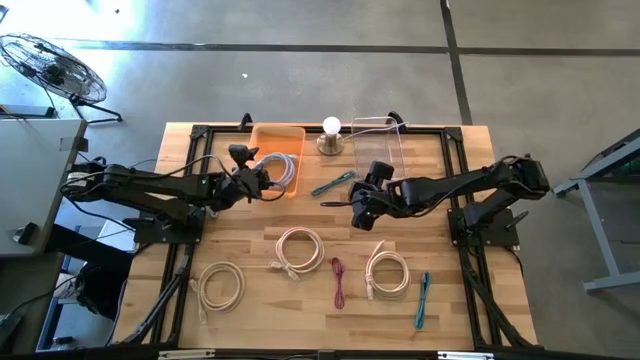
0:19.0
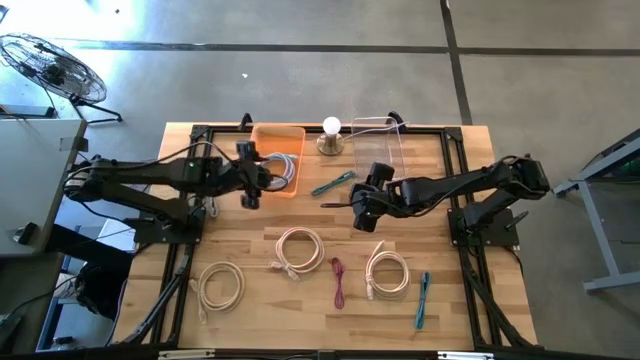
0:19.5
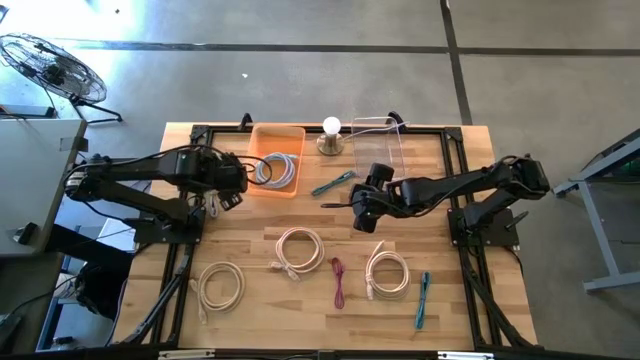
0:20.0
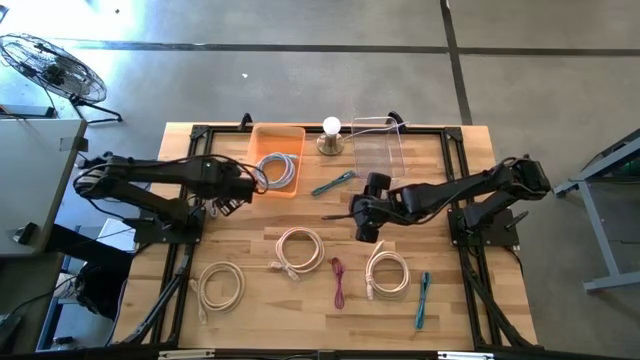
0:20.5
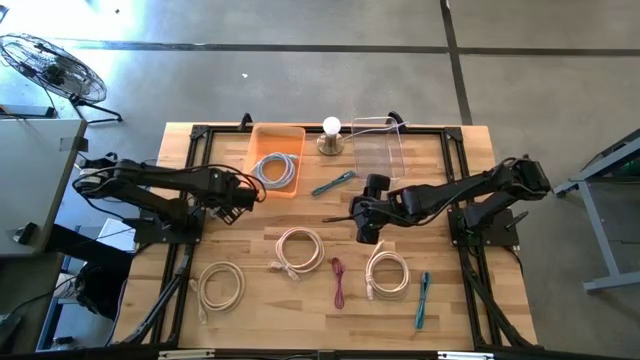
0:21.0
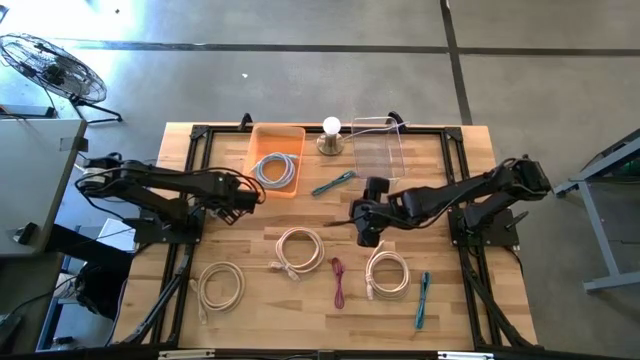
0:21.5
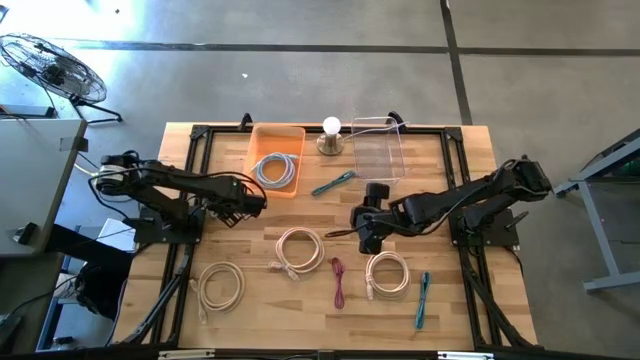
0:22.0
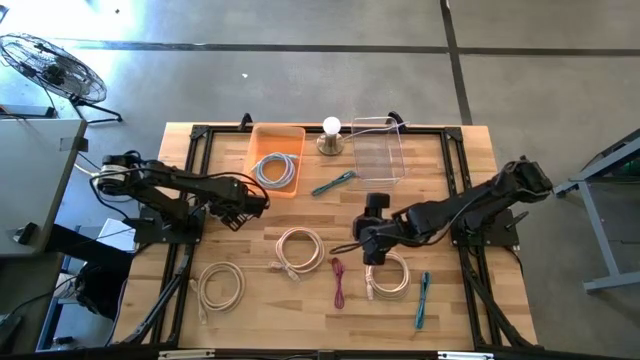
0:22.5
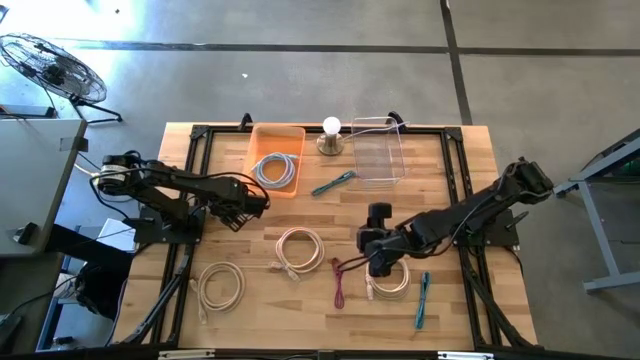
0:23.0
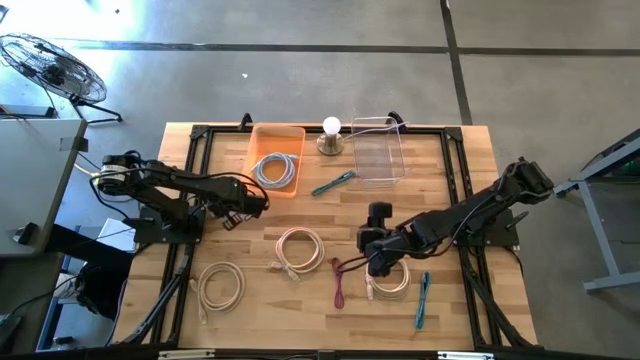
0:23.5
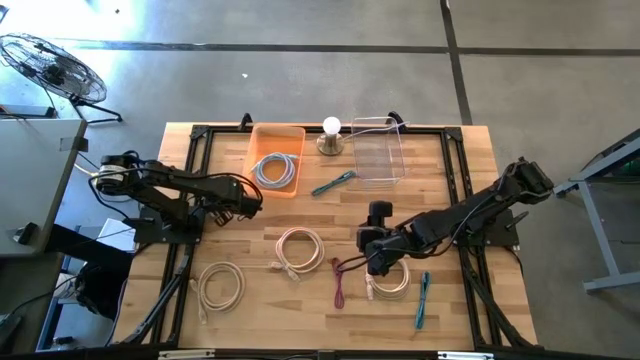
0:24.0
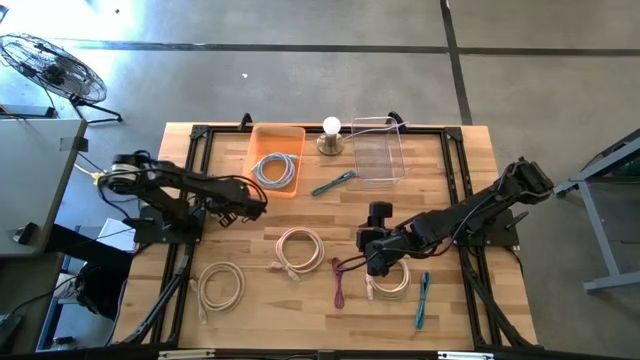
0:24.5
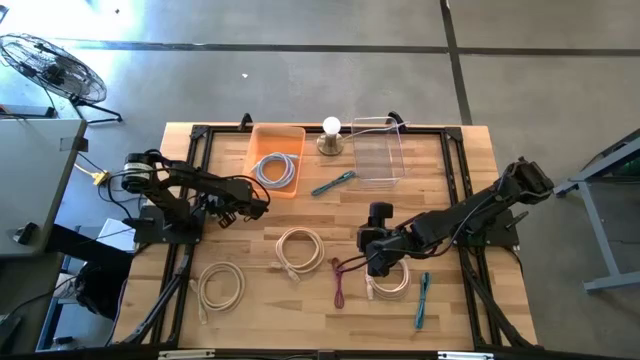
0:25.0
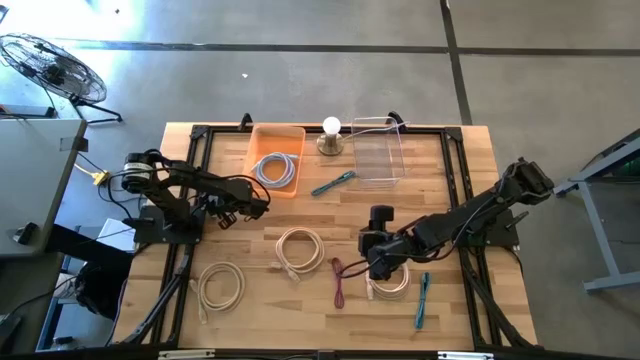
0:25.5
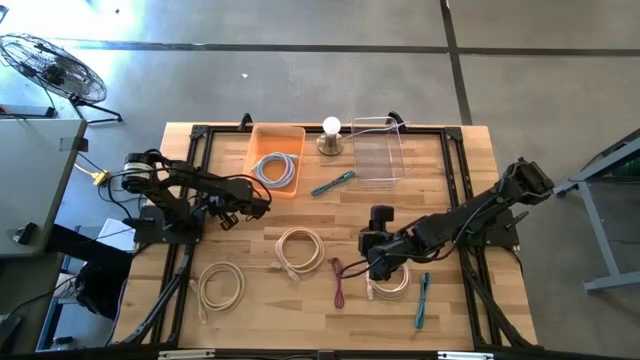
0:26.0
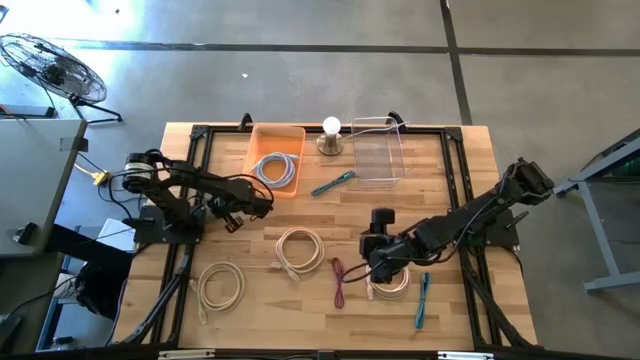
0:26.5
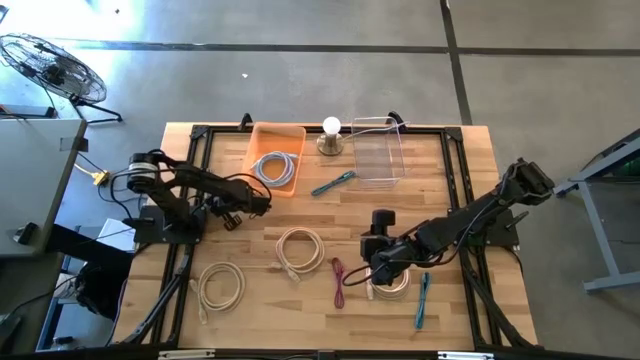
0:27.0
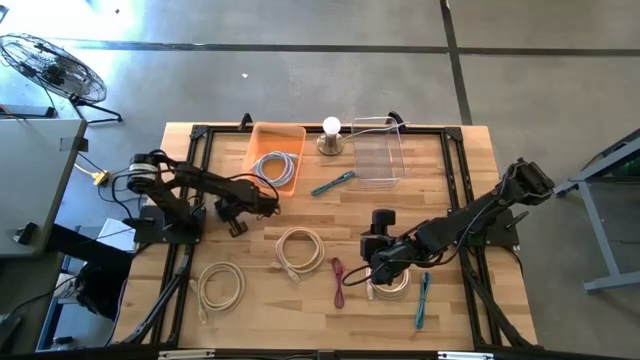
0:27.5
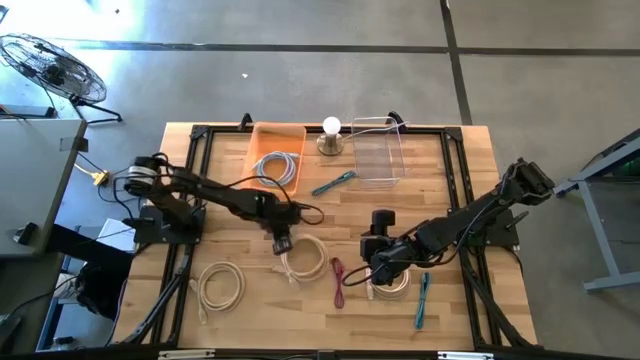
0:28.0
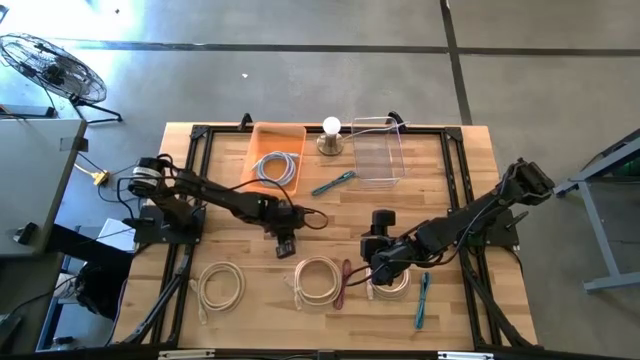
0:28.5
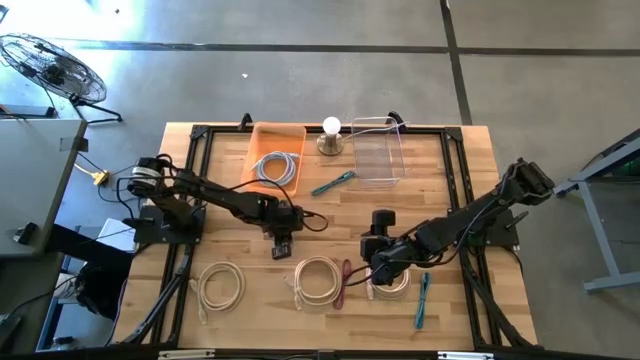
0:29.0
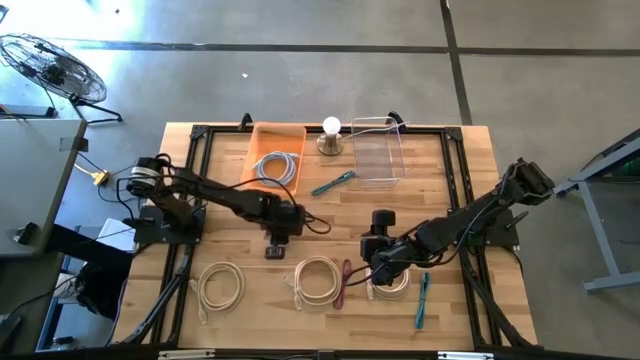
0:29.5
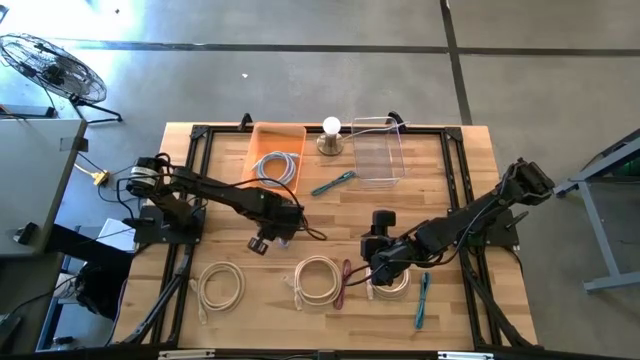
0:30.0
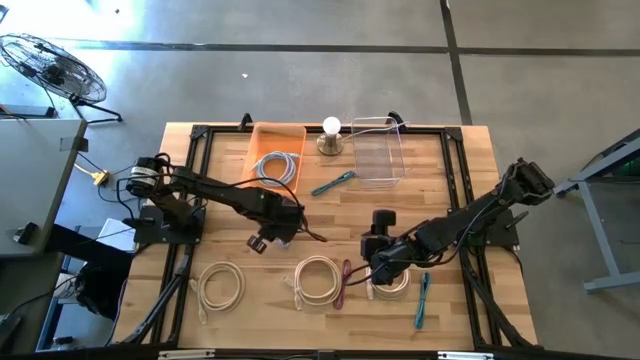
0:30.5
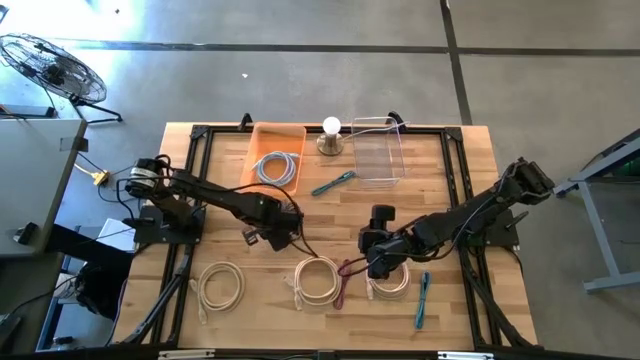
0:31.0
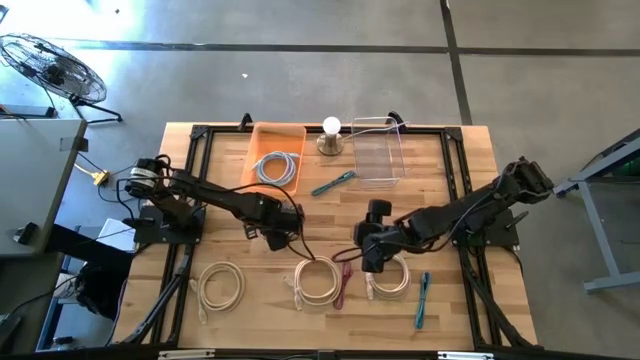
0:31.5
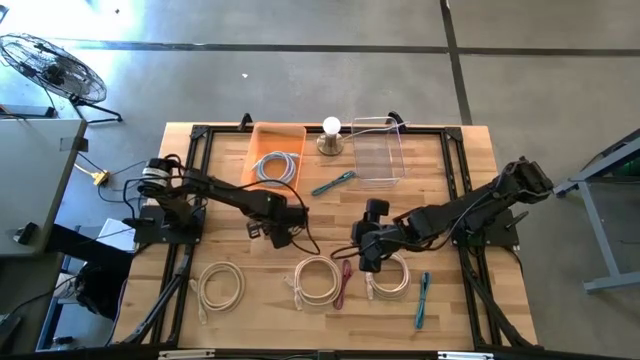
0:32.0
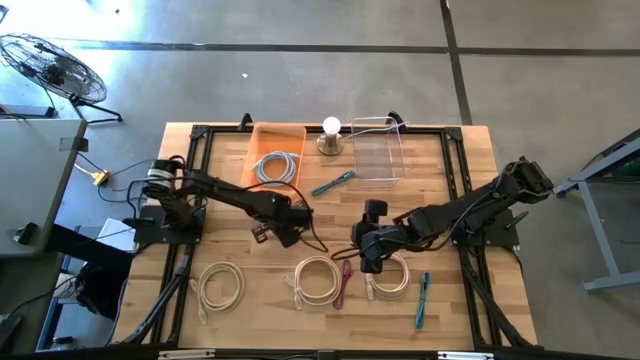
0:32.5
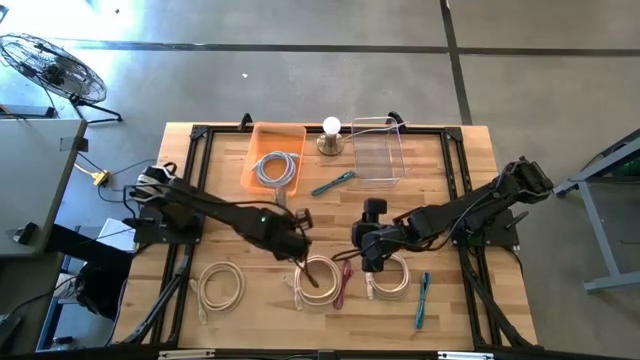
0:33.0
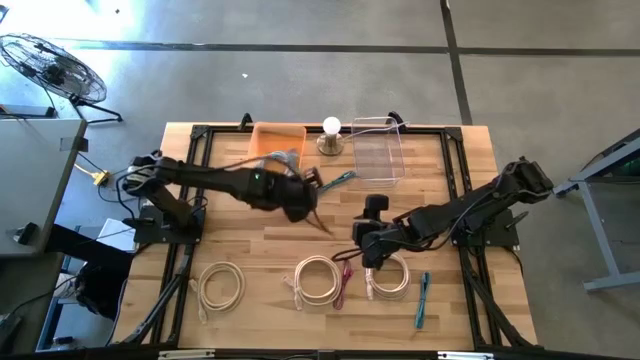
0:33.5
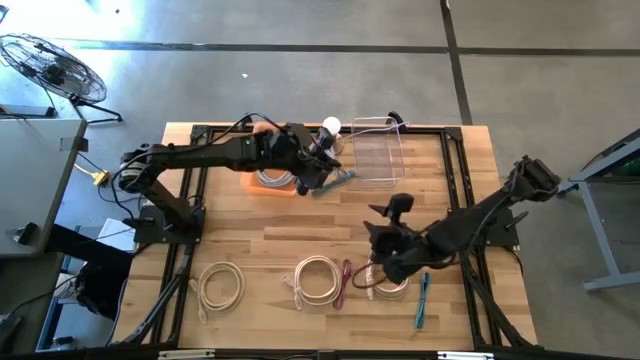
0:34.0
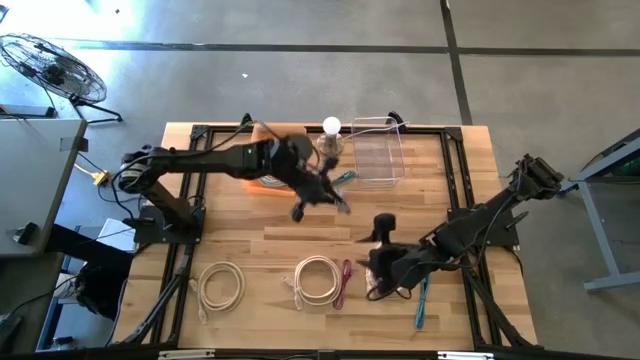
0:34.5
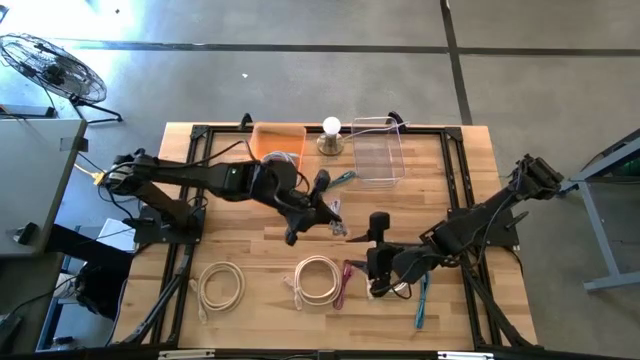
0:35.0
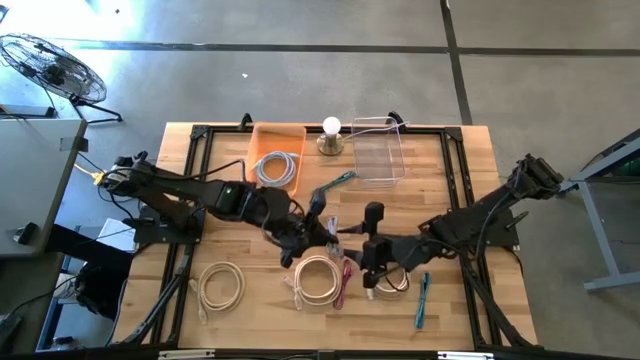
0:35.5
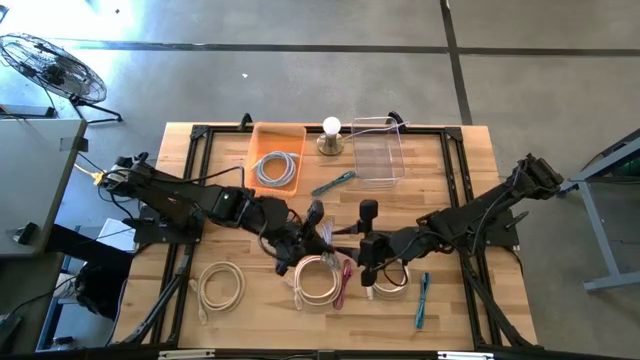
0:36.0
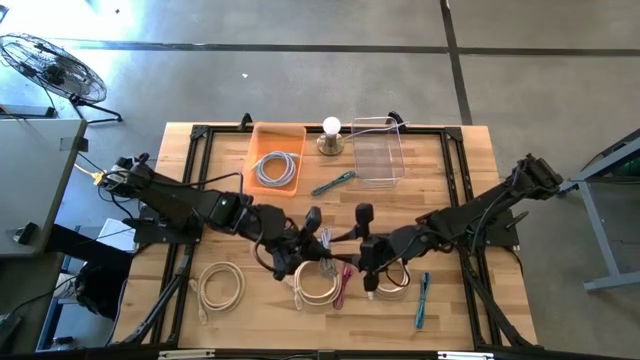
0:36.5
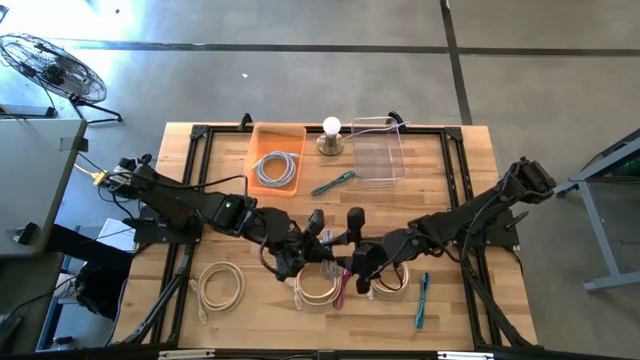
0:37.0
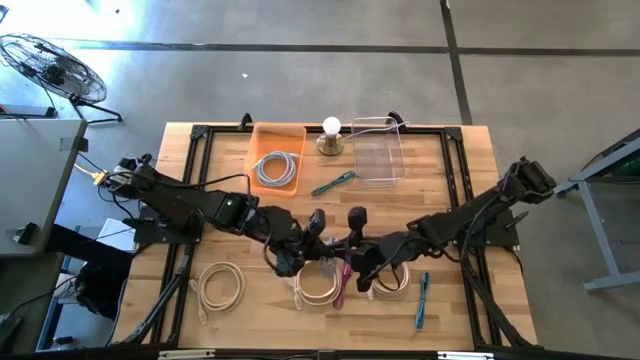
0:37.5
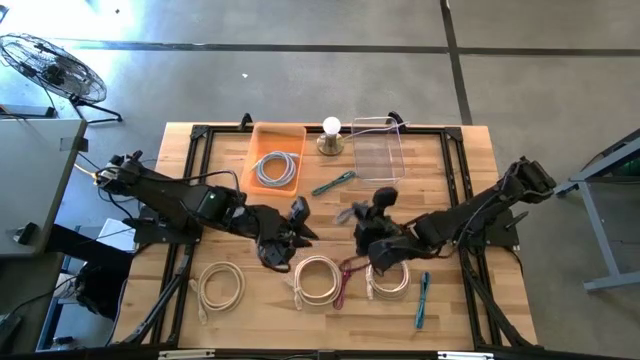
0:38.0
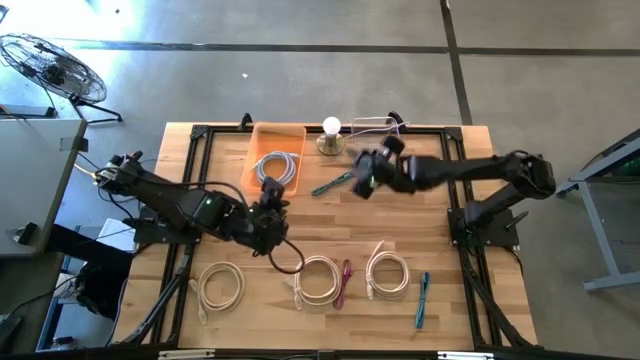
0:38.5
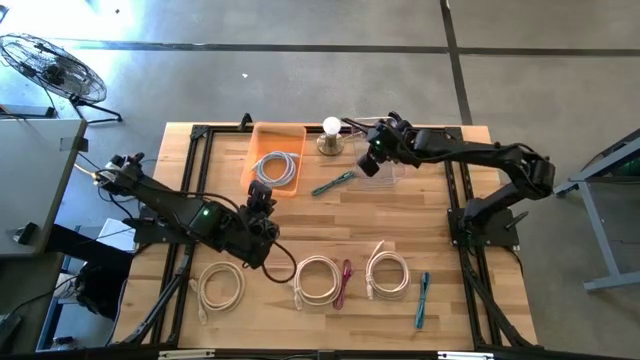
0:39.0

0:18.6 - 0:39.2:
Task: Pick & Place USB Port
Put the white charger cable into the transparent bin

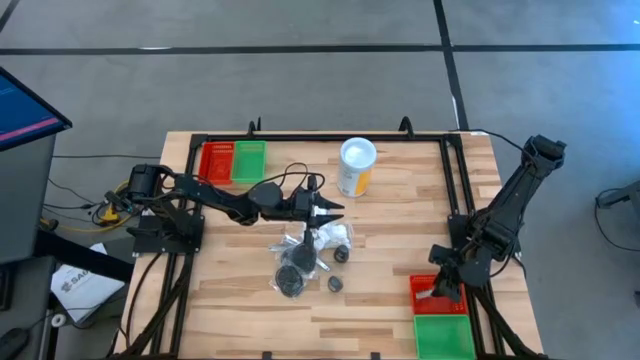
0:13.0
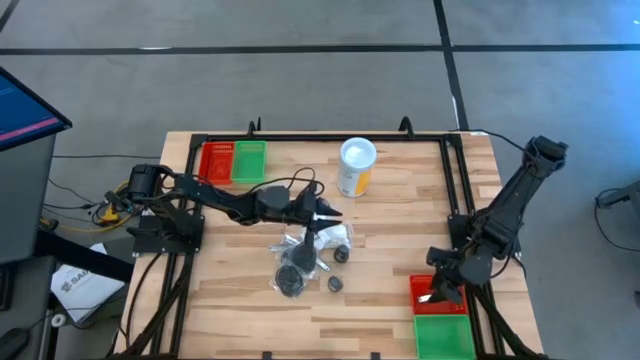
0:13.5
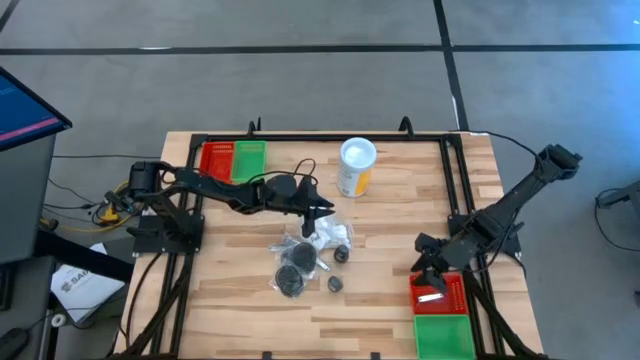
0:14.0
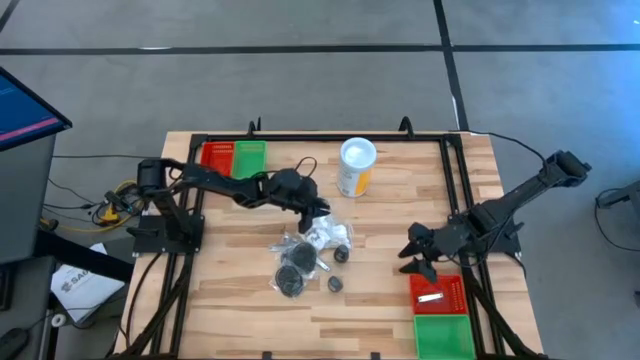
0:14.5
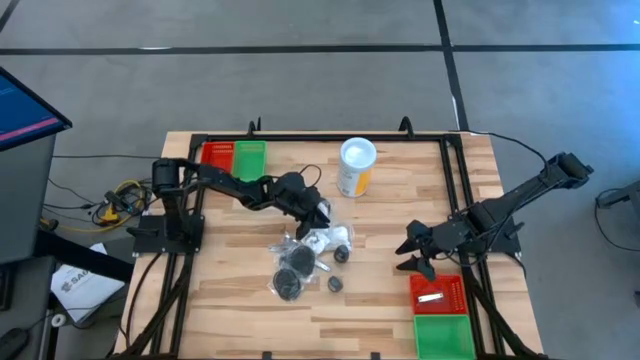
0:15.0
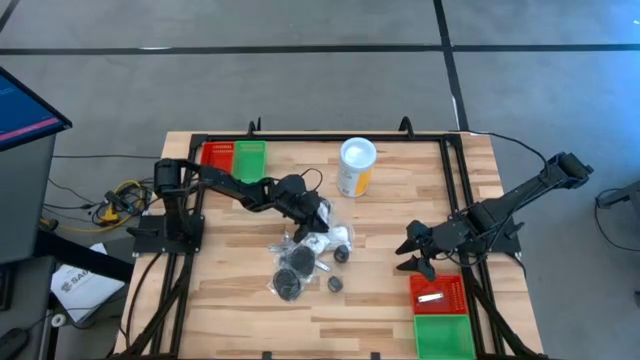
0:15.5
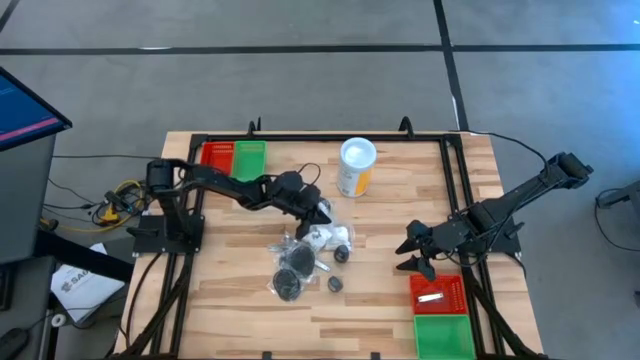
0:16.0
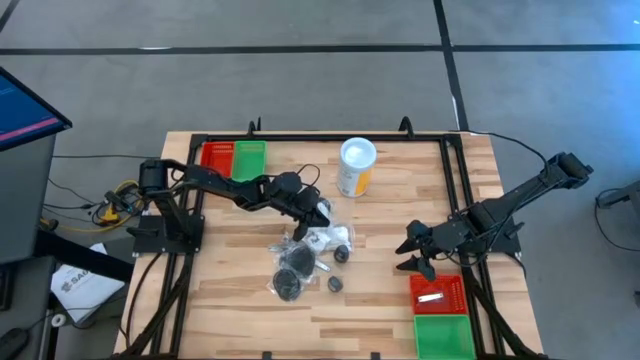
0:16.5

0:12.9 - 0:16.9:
Task: Pick & Place Travel size toiletries
Put the white cotton pack into the bottom green bin
